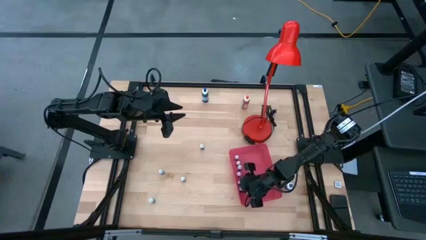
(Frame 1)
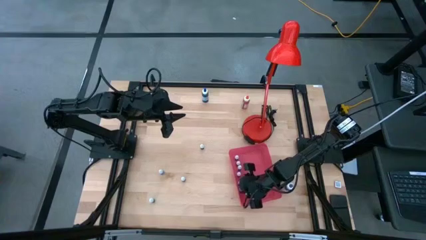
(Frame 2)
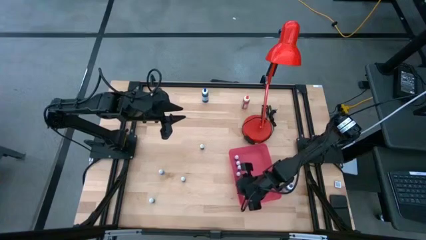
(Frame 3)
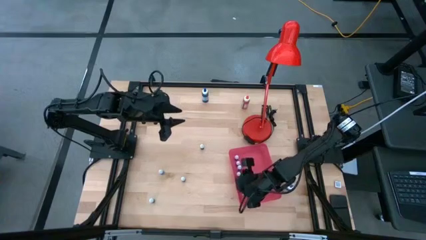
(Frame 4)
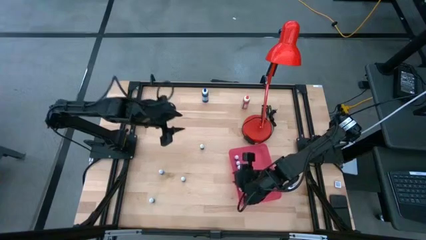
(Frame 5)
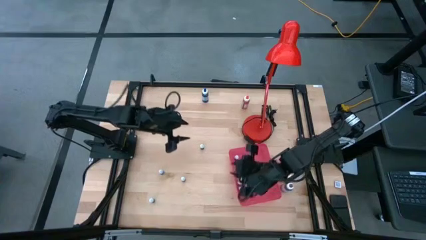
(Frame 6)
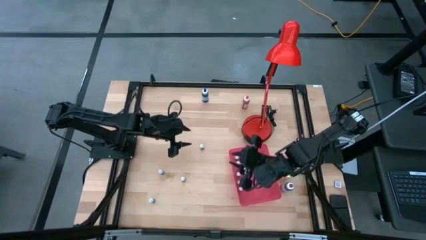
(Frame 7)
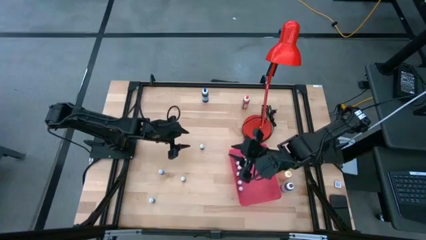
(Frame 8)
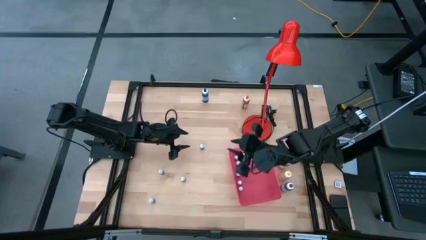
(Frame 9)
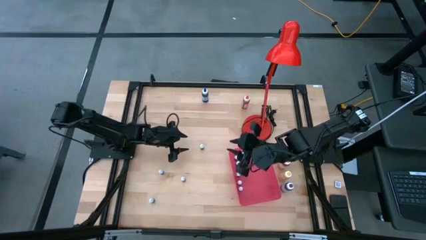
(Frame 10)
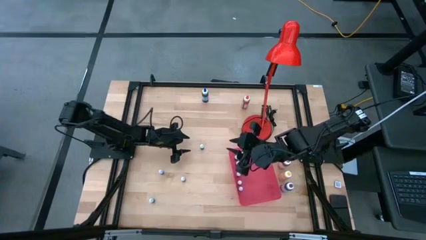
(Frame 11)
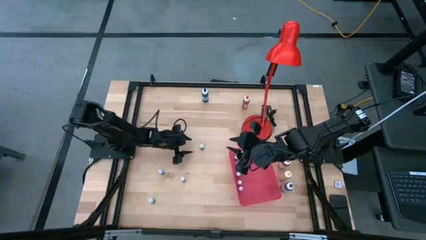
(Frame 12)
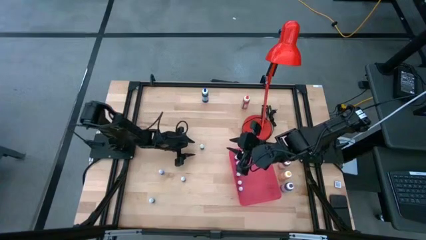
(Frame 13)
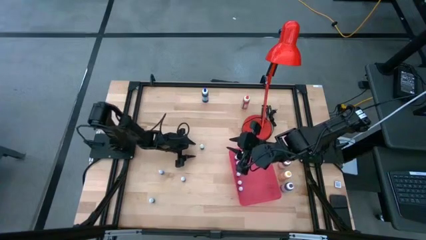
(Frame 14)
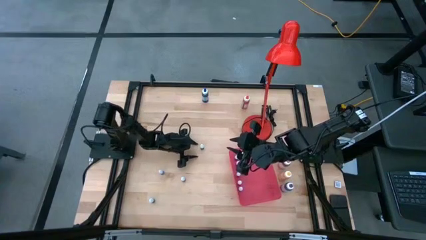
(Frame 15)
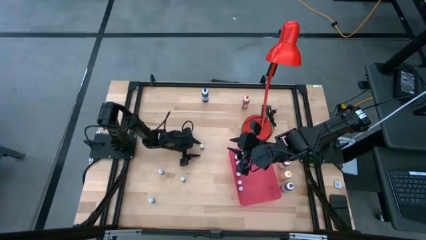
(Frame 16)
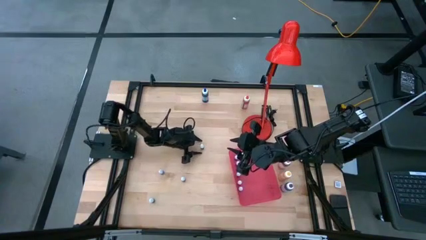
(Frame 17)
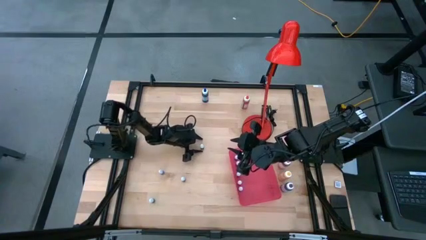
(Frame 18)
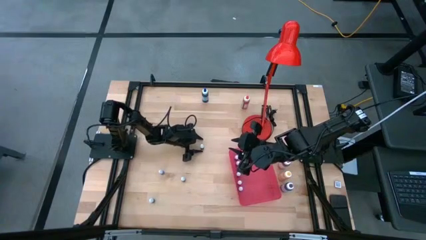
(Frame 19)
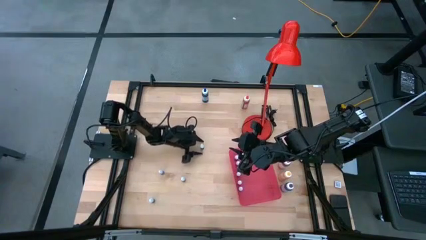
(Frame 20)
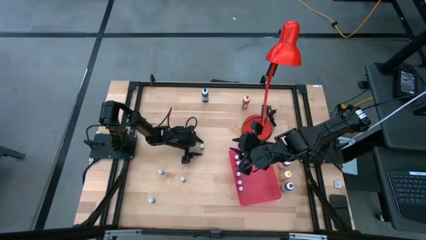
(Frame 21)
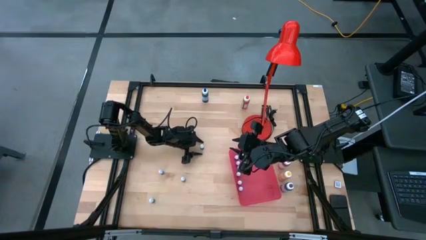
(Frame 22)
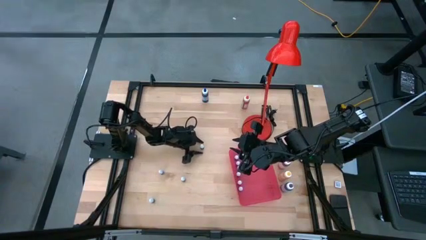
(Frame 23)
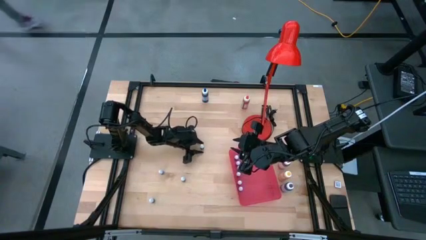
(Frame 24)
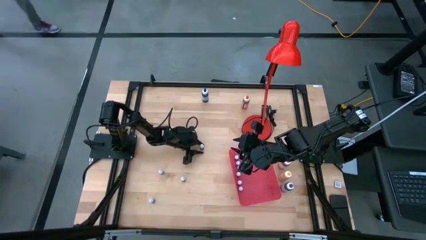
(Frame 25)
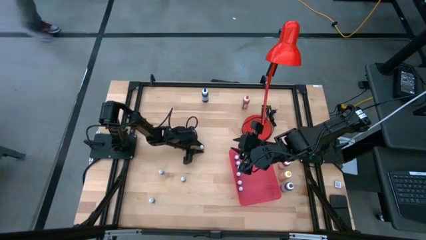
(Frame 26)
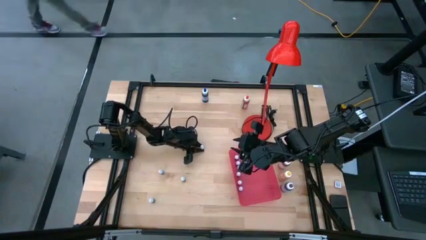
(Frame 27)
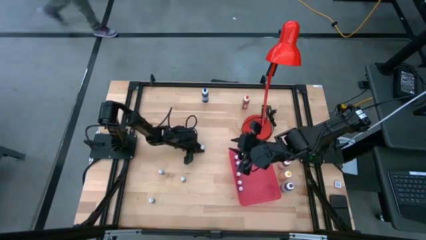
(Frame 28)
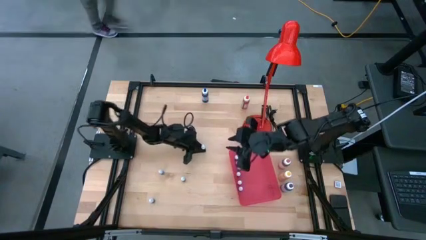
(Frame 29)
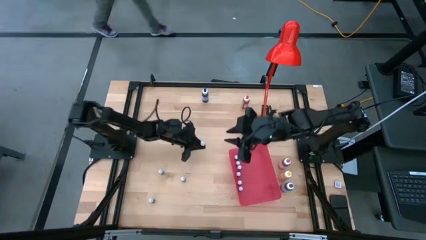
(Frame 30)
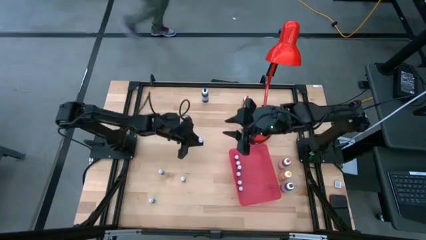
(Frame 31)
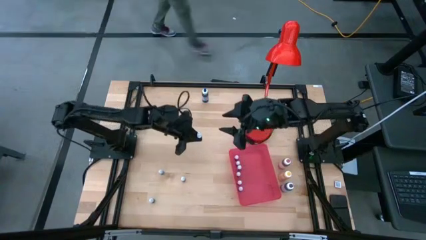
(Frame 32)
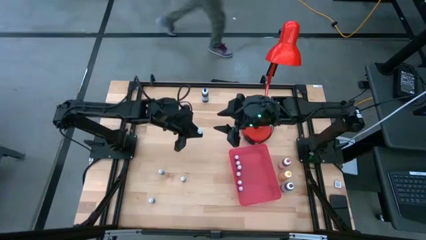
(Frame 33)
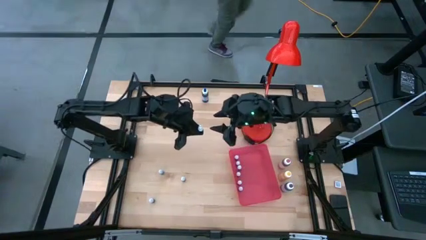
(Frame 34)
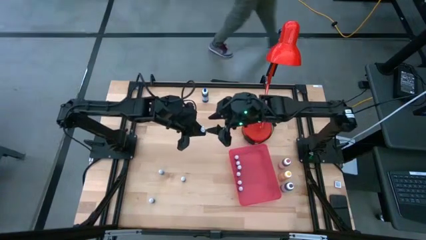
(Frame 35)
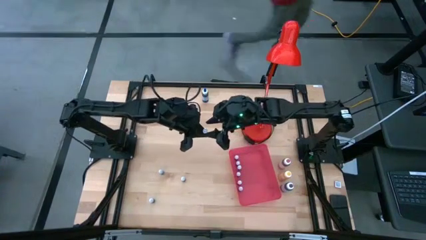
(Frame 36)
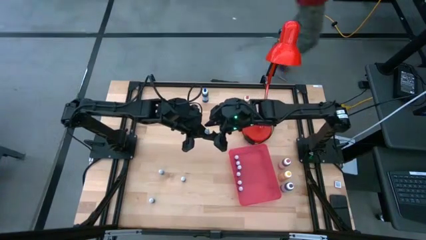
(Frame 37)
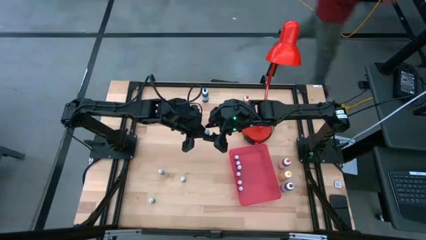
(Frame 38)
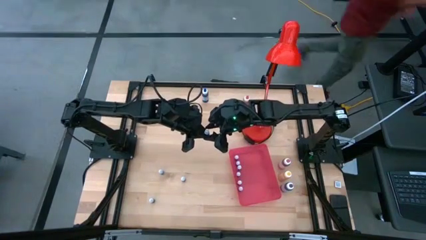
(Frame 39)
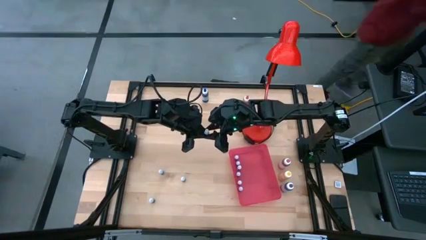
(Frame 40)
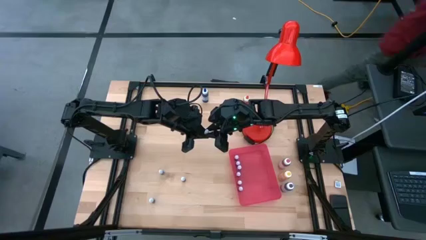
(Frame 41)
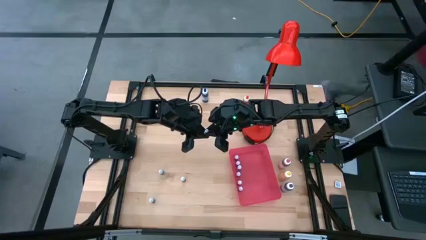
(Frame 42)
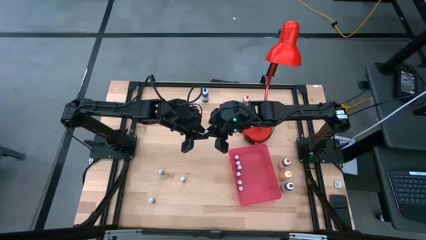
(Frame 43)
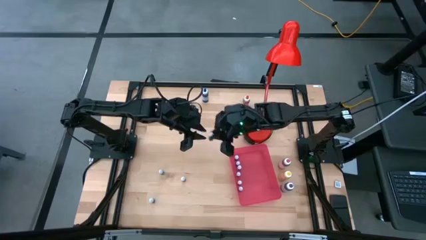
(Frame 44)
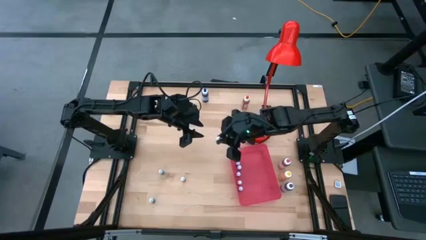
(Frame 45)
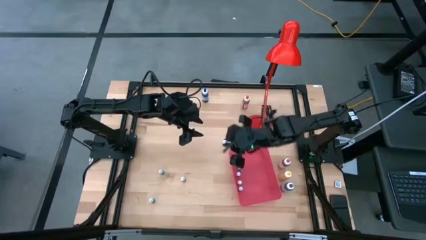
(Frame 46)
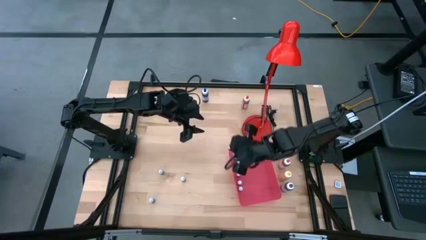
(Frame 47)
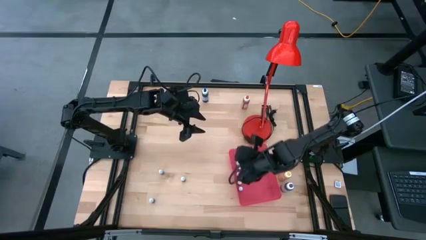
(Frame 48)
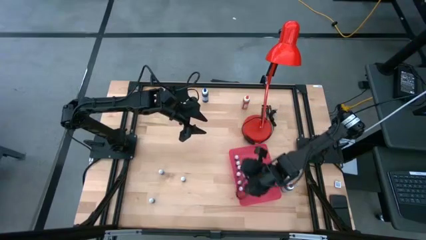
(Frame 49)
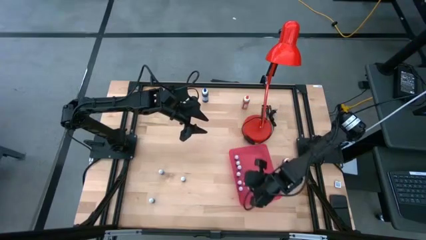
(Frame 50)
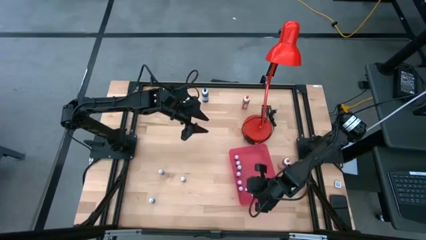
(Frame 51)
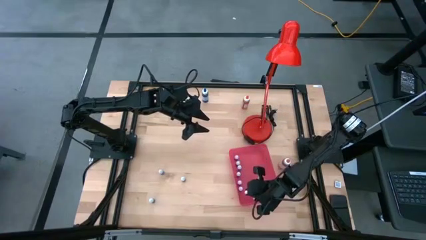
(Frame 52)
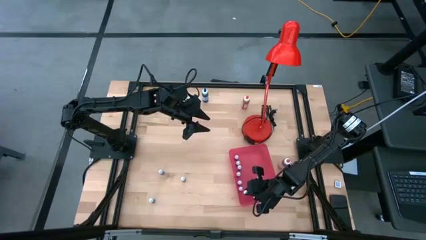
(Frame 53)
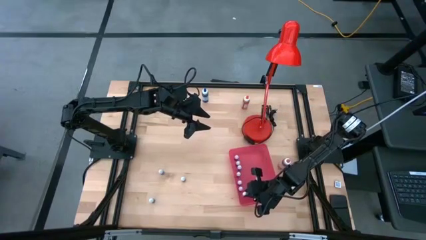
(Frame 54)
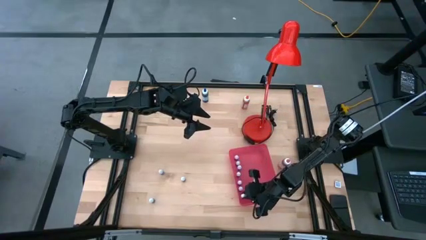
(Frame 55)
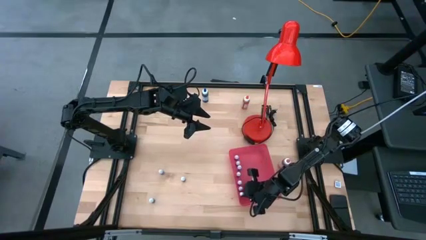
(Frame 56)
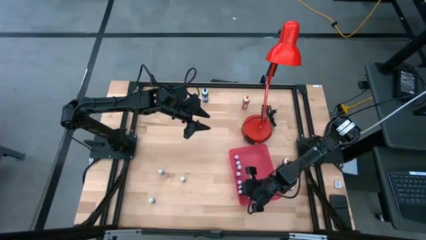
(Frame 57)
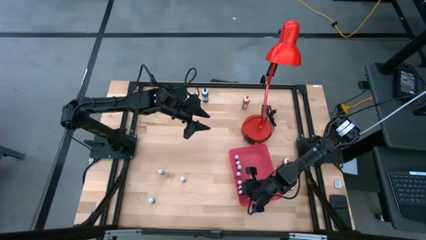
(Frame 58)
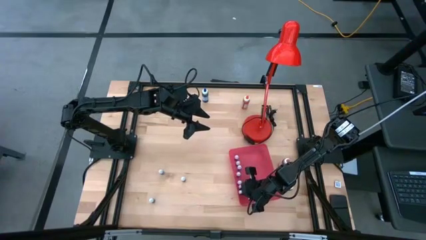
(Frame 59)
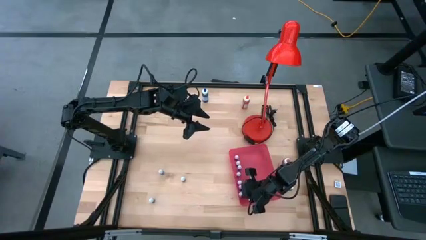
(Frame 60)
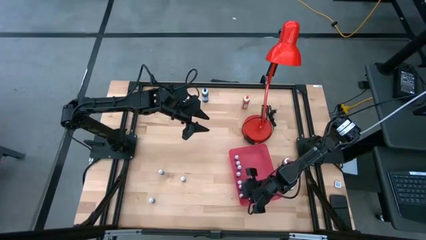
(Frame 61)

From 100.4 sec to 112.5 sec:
Task: Pick & Place food coloring
Put the small green food coloring bottle into the red bin
